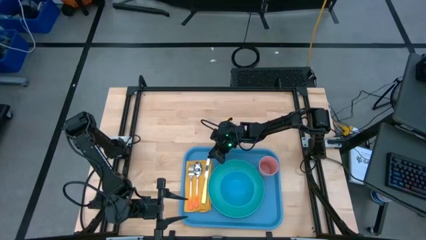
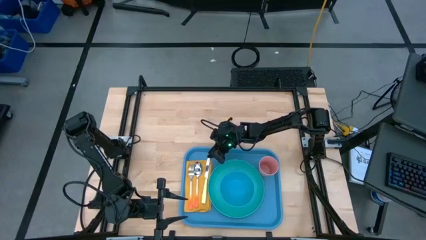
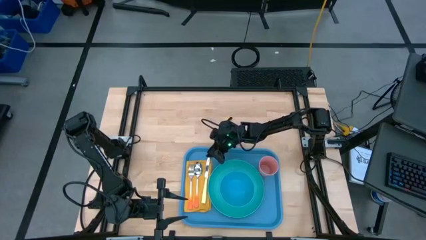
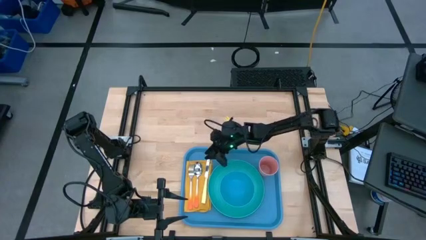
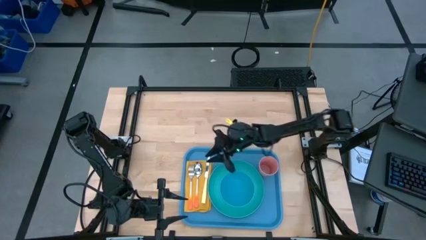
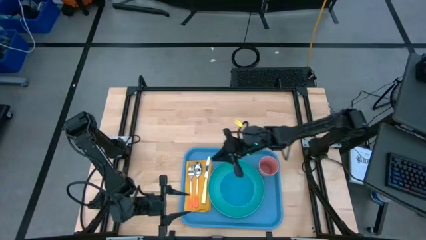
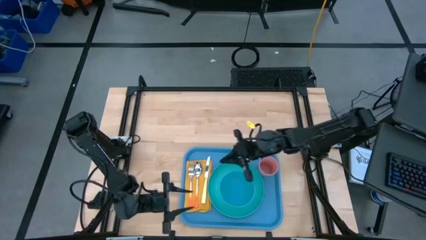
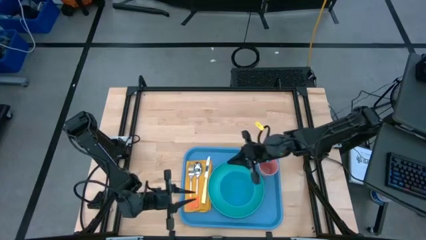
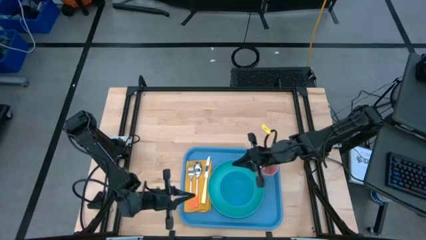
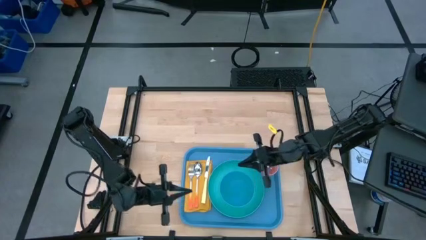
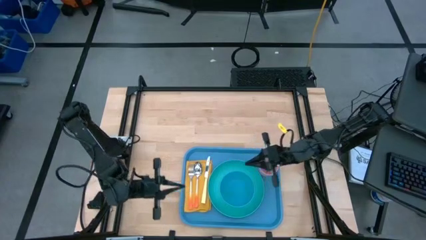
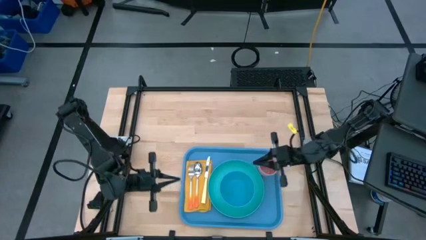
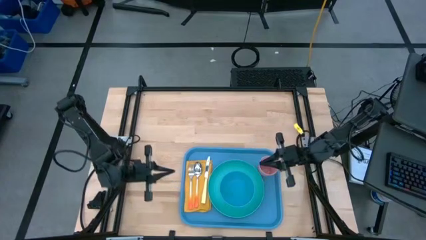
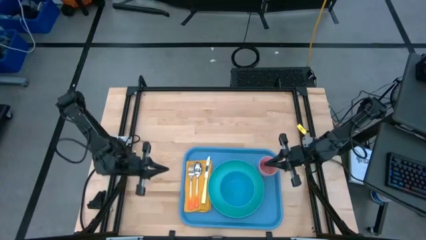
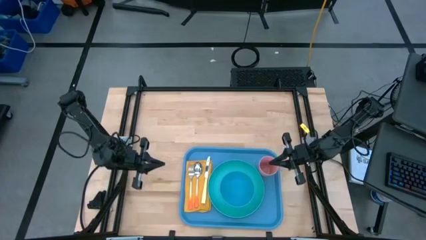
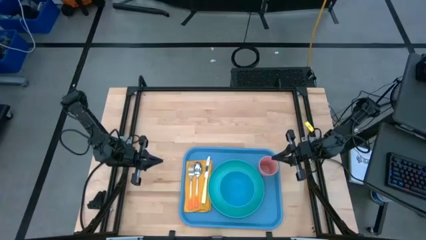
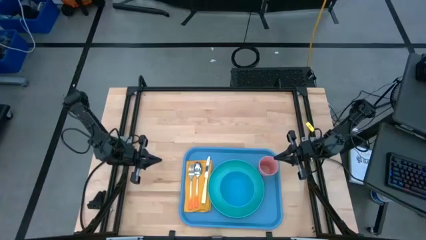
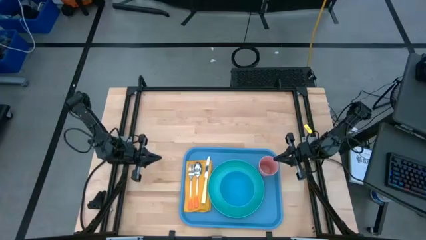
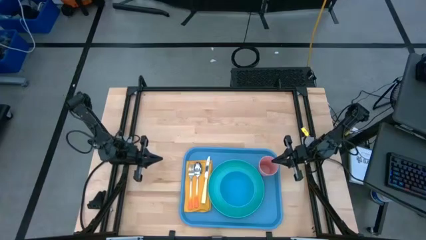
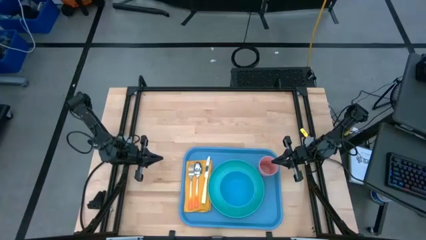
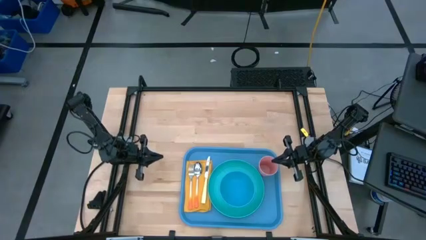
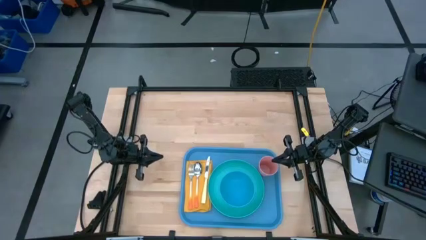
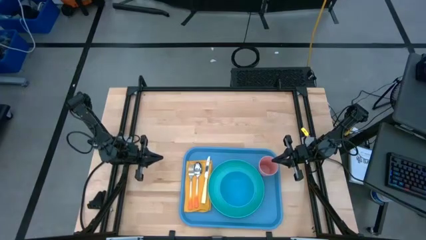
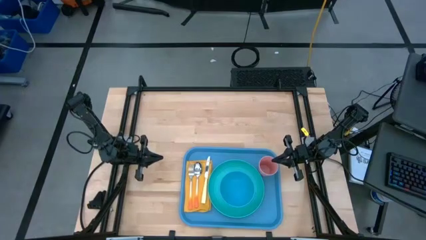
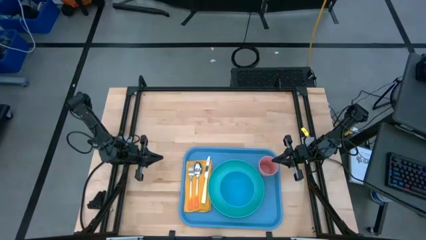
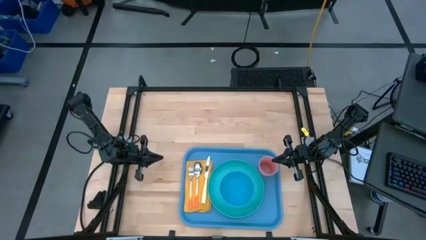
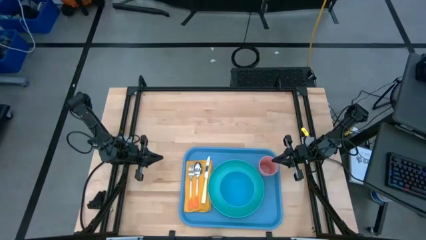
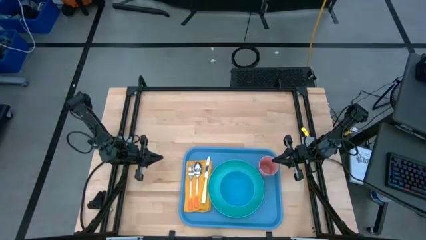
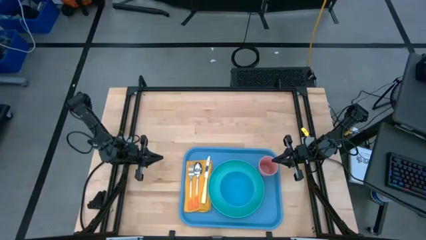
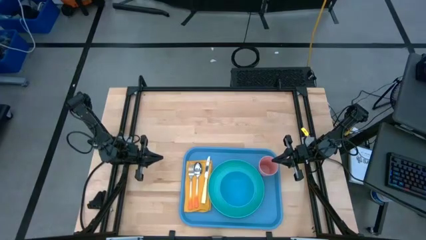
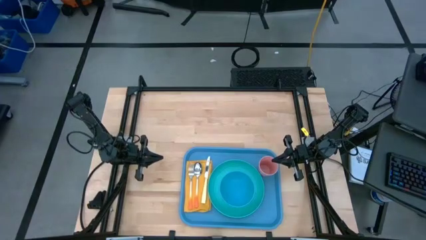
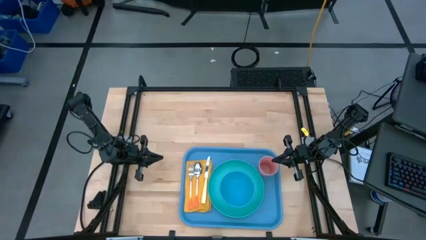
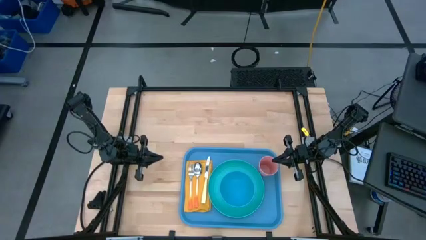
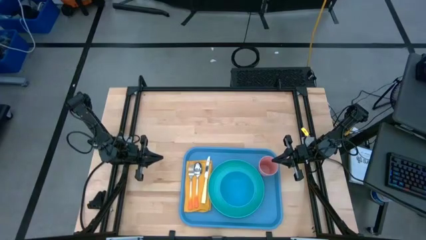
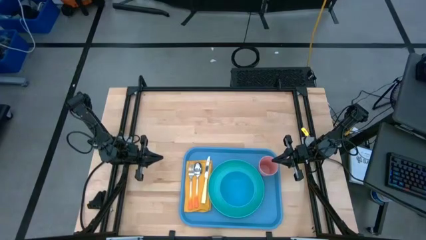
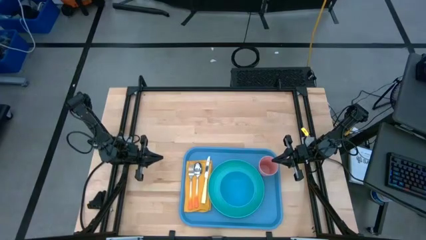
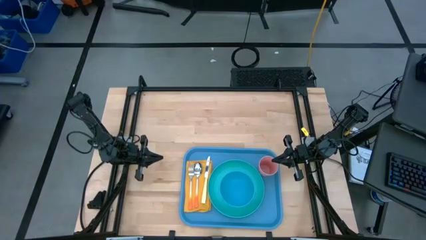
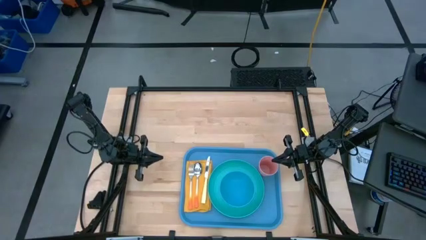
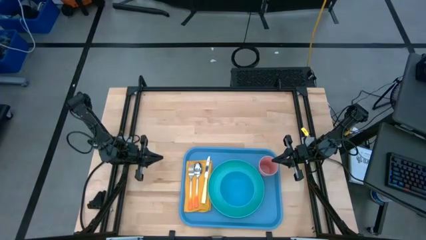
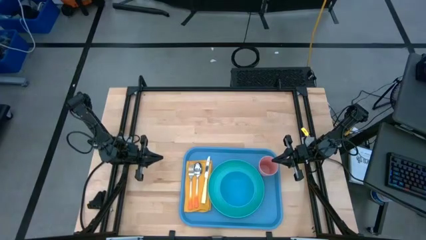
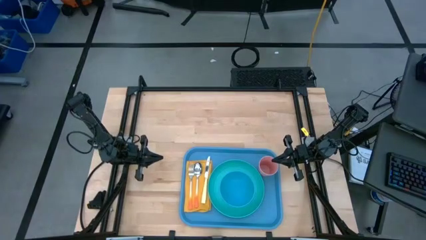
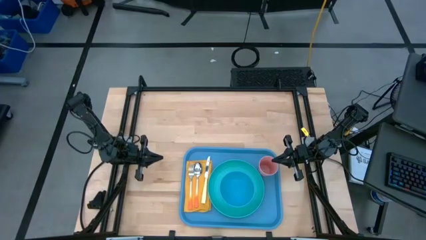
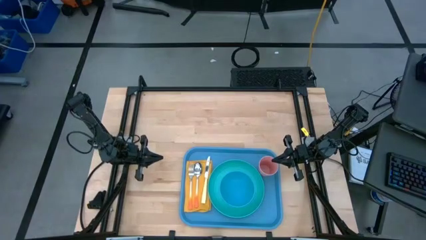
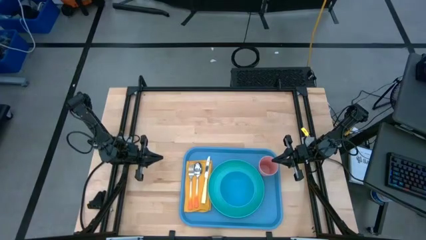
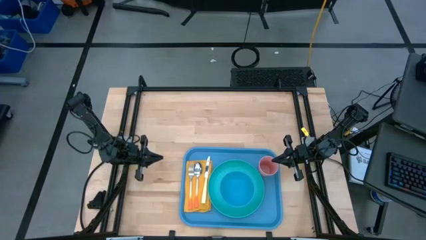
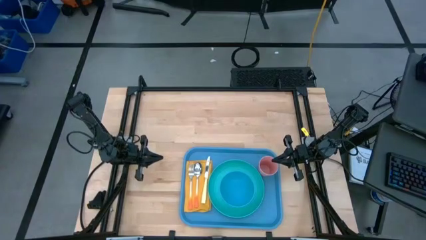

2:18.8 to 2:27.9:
Task: Set up tray
Return to Home Position

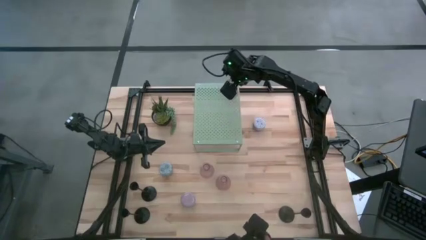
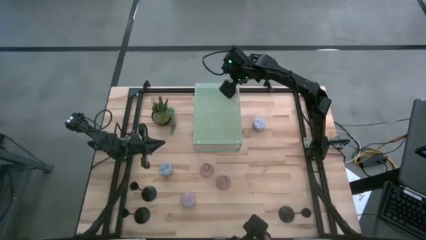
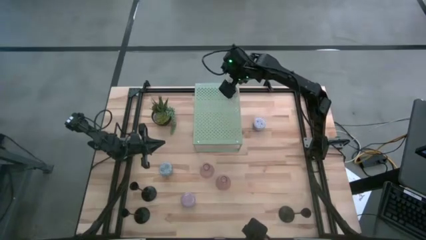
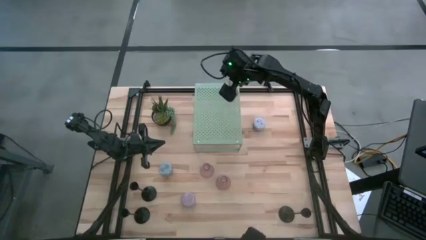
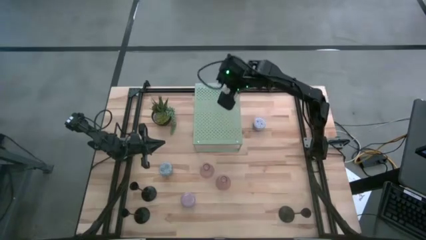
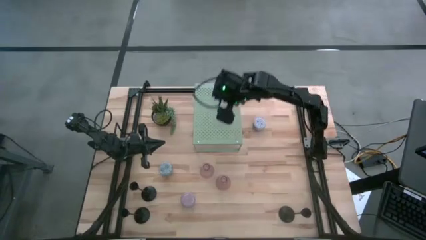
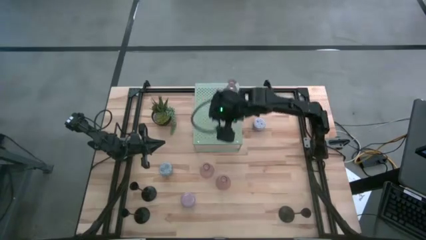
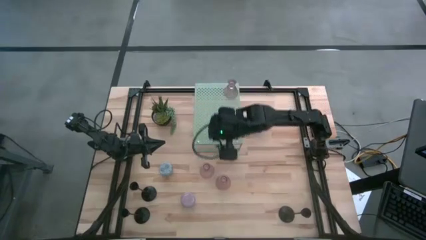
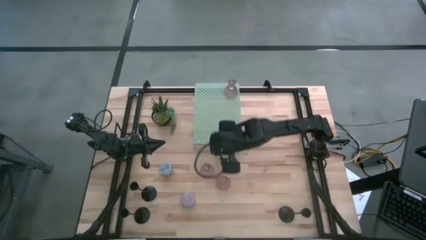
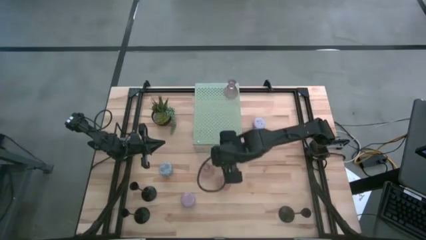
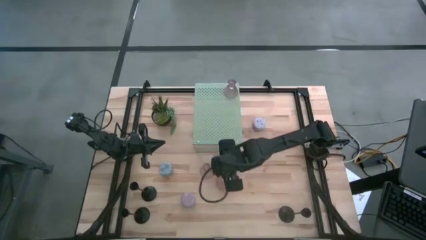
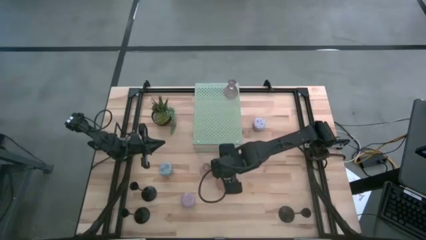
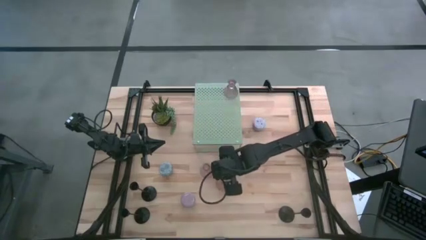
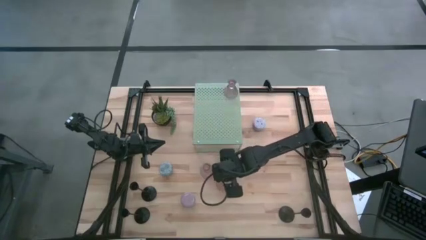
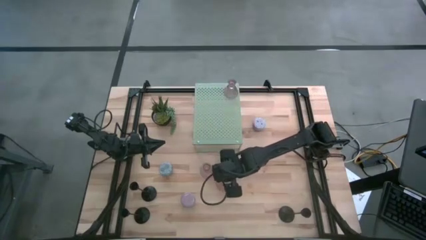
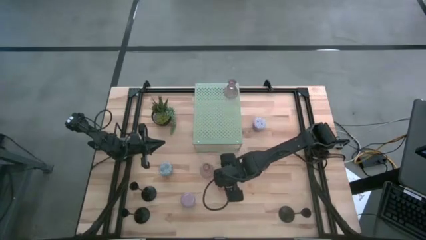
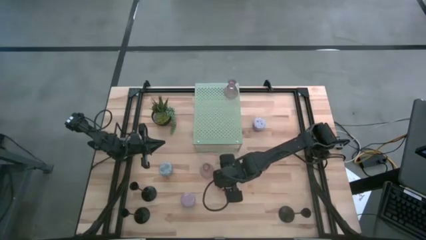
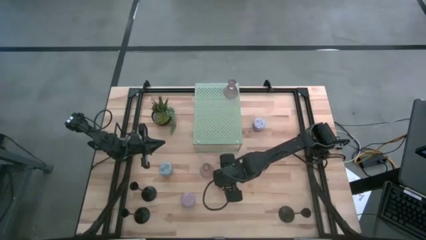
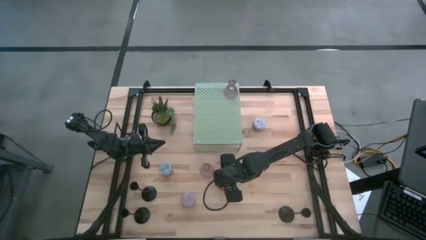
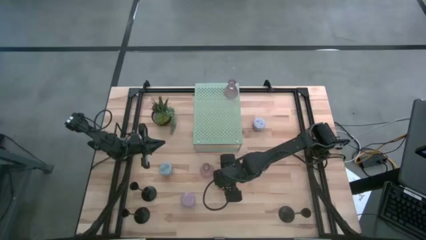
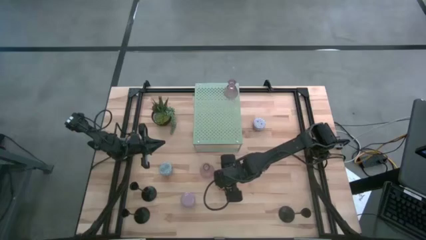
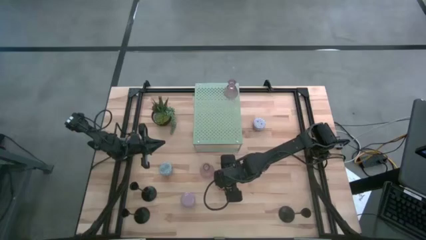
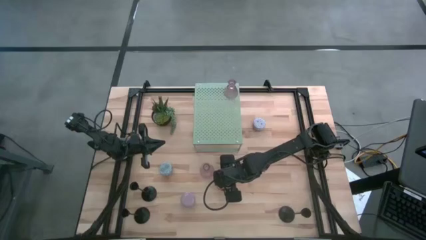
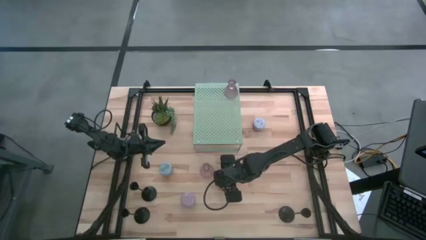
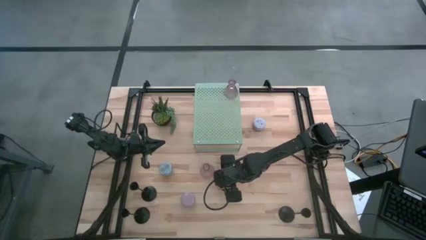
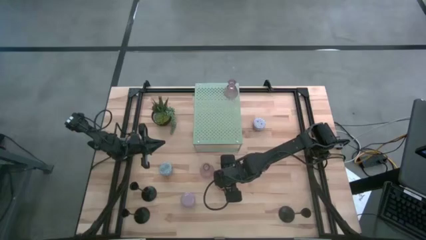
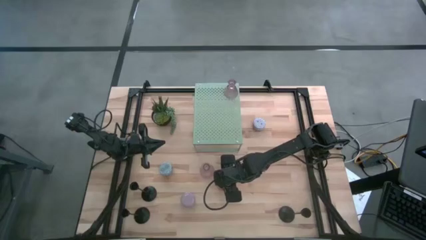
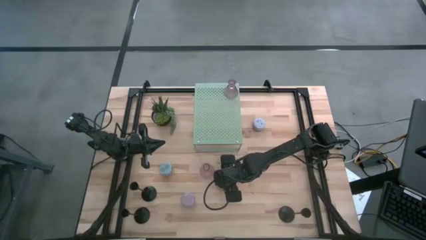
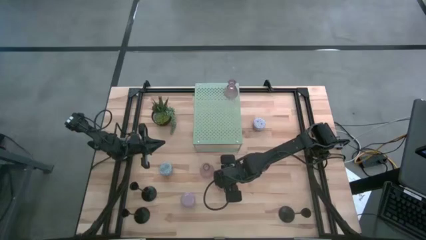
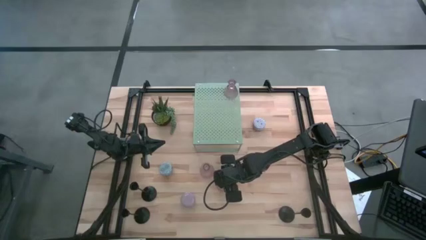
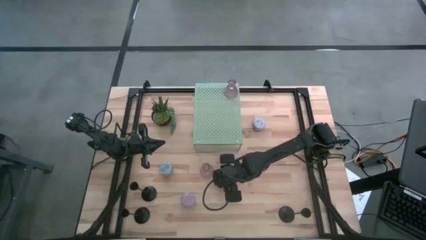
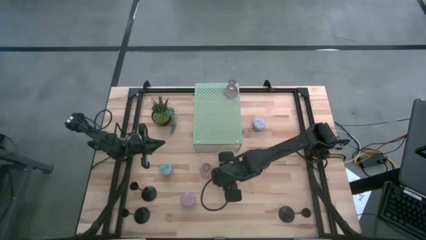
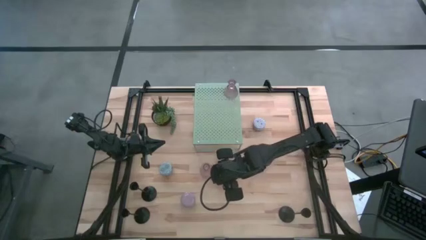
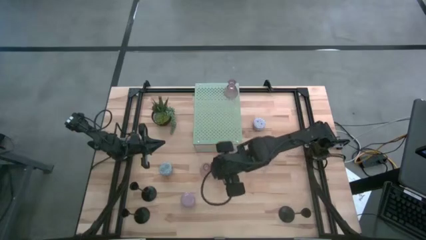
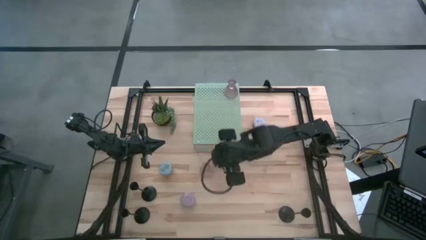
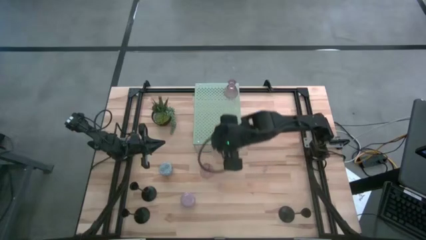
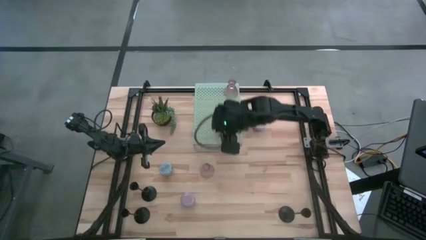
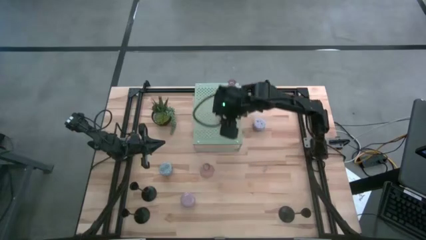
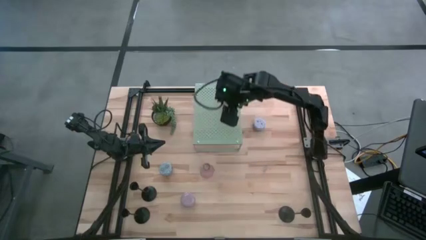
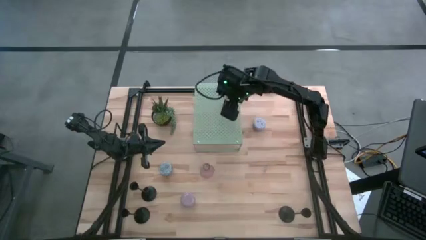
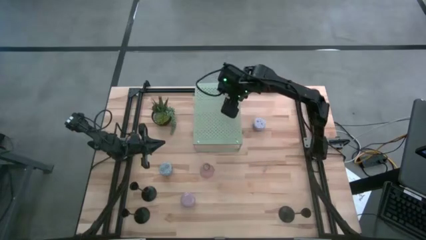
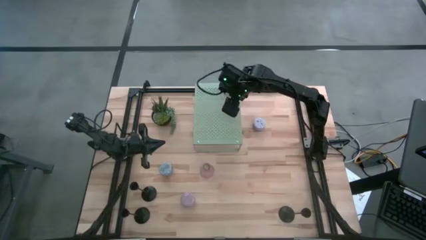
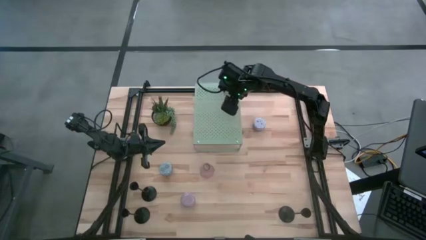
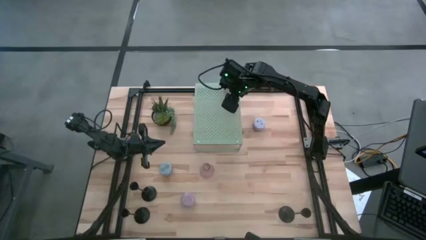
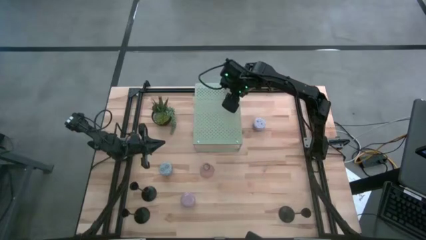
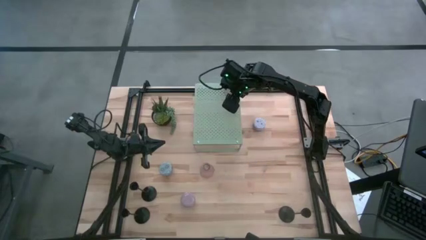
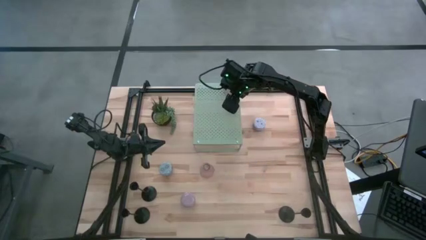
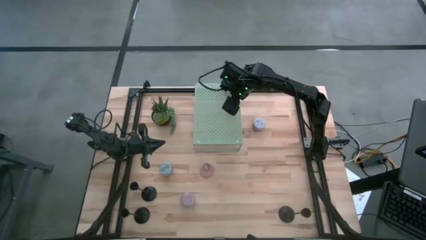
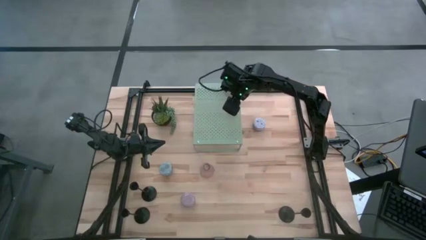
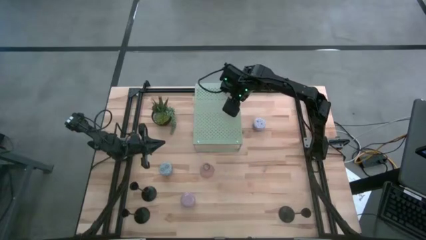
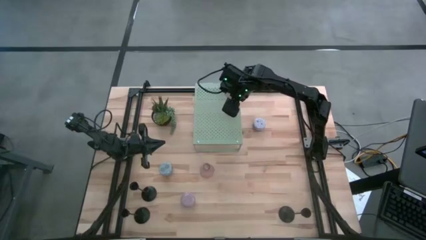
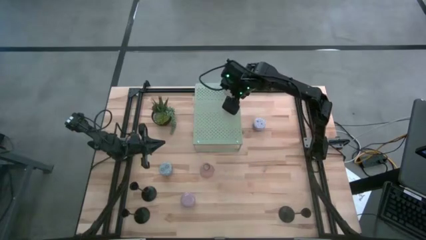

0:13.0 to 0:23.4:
Task: Pick & Place candle stick holders
Put the bottom pink glass candle holder on the shelf aligned with the other pink glass candle holder
